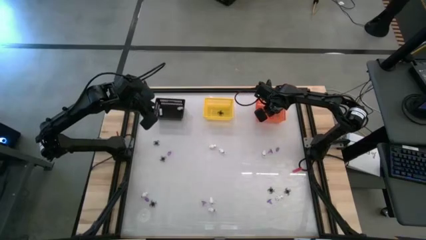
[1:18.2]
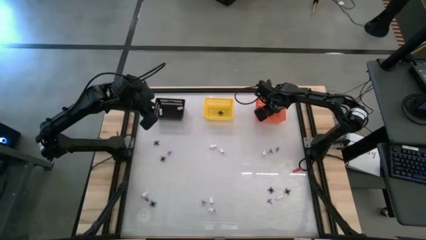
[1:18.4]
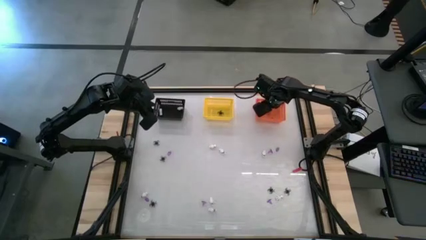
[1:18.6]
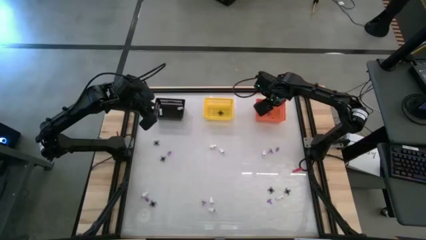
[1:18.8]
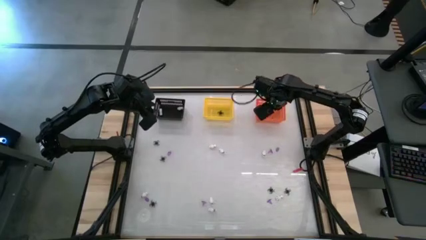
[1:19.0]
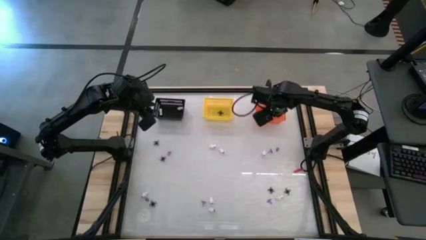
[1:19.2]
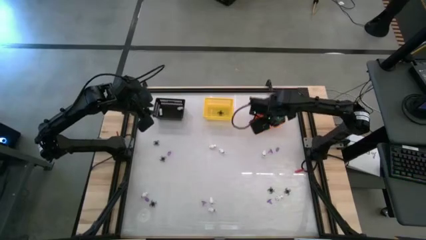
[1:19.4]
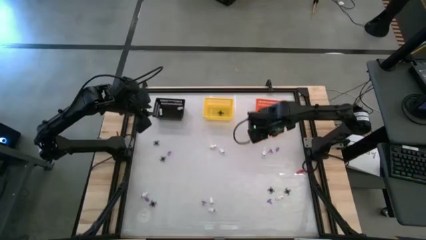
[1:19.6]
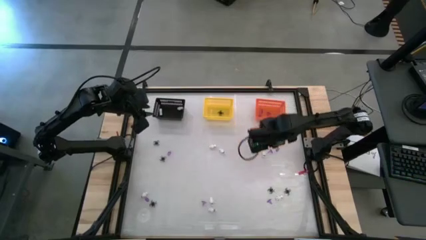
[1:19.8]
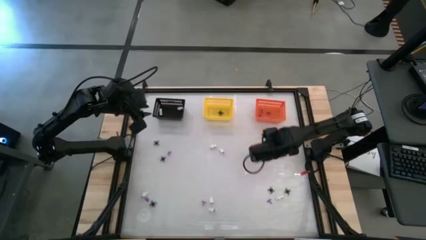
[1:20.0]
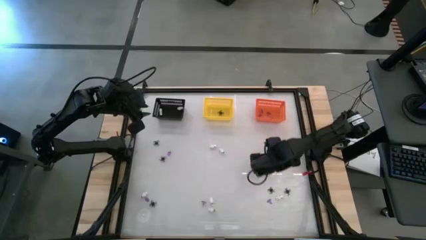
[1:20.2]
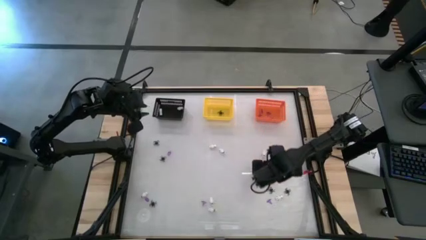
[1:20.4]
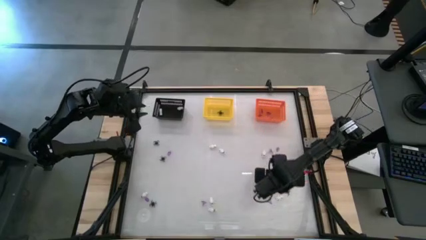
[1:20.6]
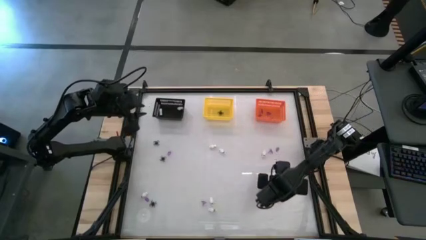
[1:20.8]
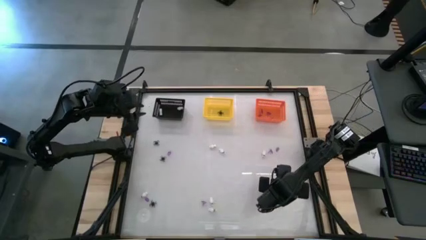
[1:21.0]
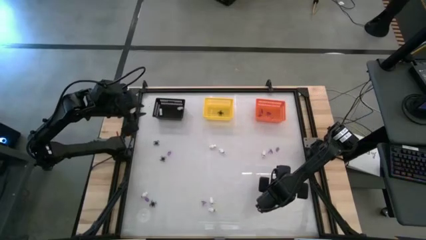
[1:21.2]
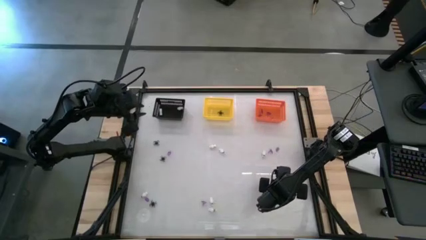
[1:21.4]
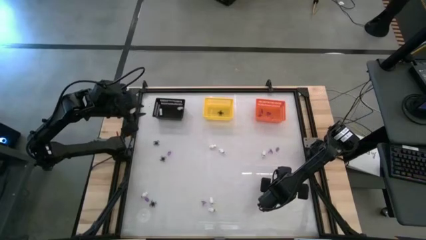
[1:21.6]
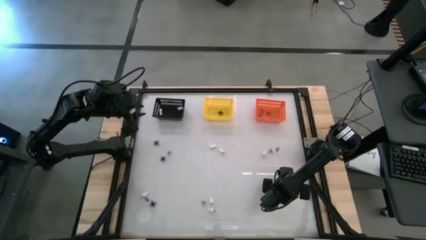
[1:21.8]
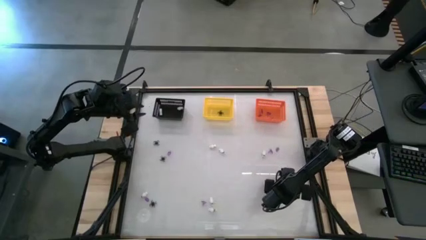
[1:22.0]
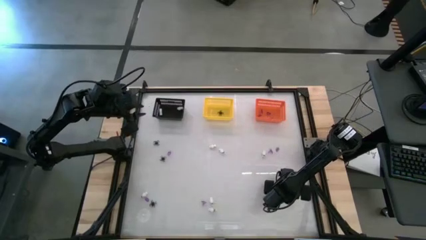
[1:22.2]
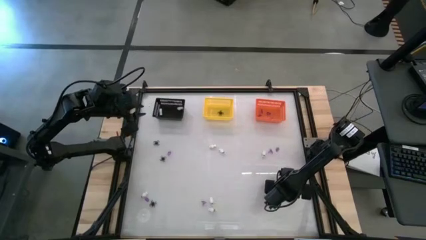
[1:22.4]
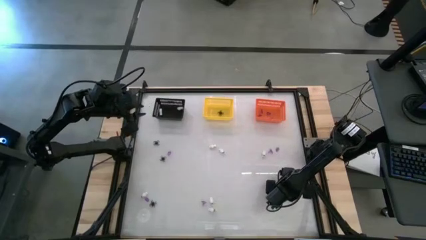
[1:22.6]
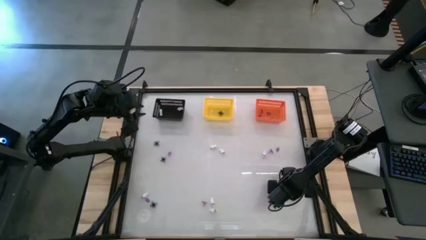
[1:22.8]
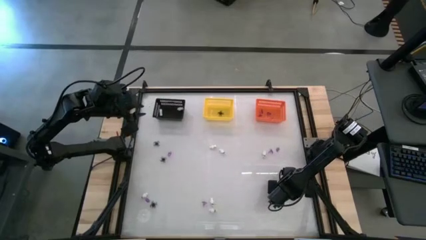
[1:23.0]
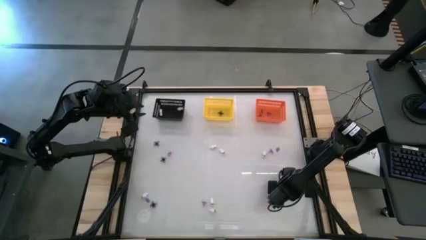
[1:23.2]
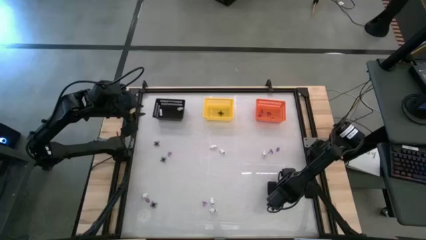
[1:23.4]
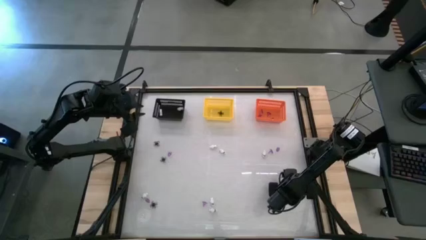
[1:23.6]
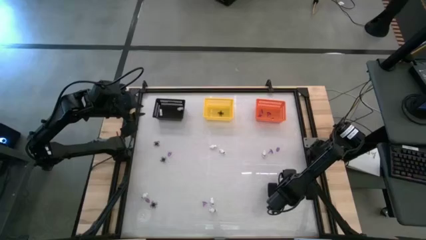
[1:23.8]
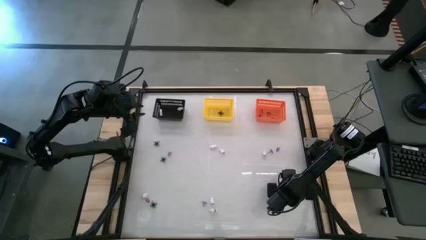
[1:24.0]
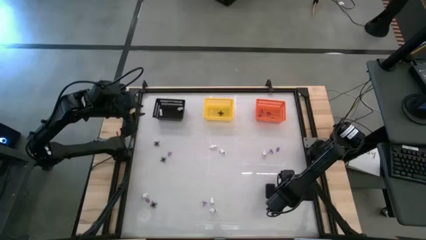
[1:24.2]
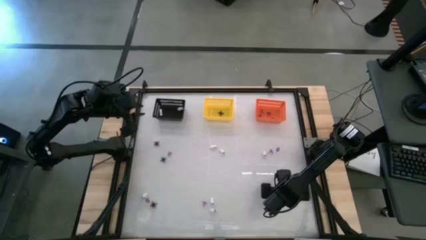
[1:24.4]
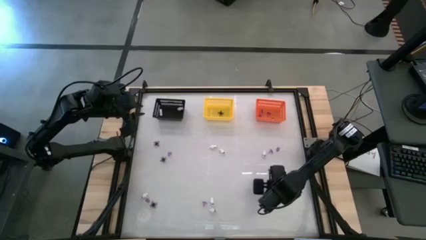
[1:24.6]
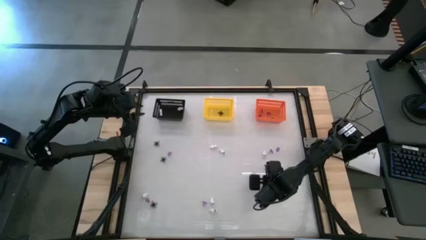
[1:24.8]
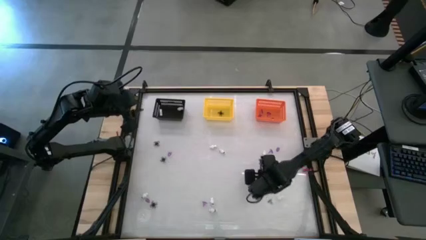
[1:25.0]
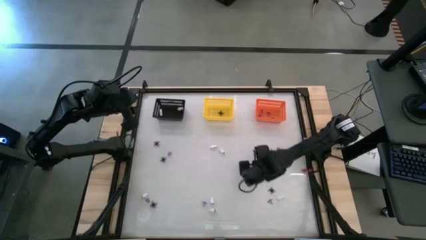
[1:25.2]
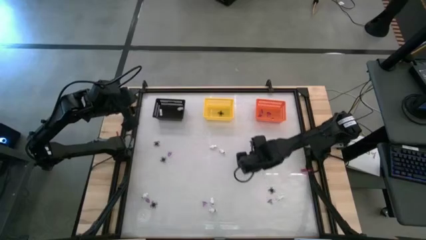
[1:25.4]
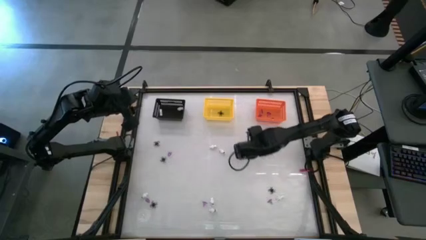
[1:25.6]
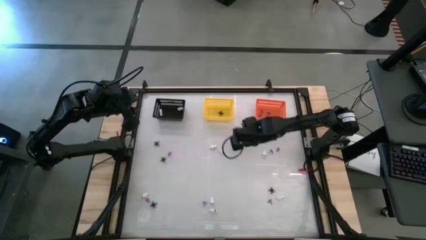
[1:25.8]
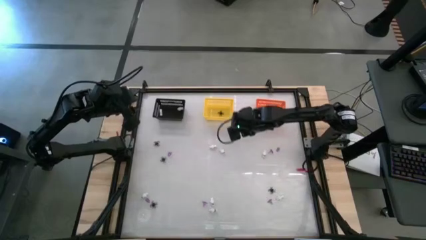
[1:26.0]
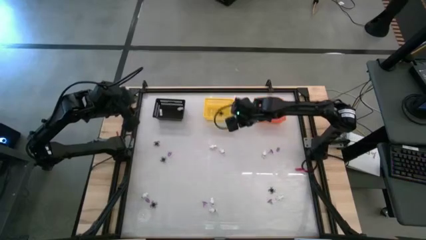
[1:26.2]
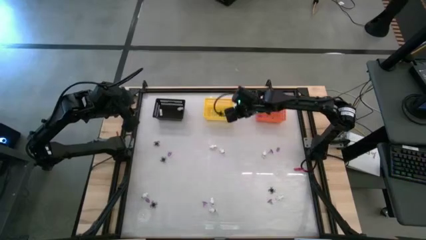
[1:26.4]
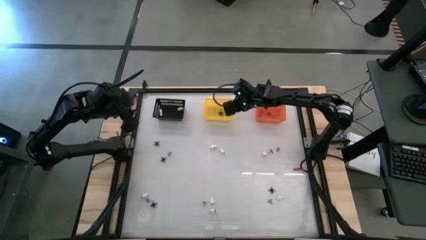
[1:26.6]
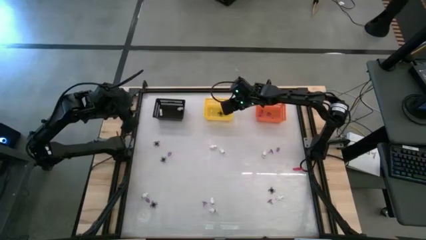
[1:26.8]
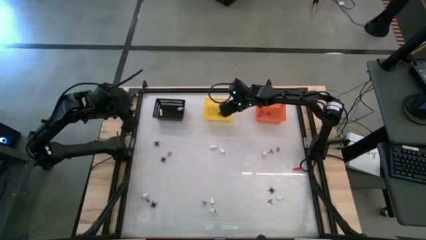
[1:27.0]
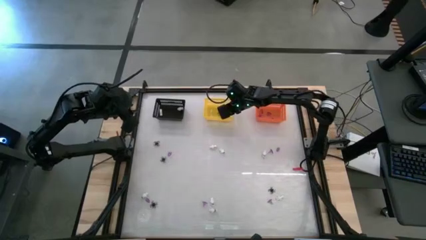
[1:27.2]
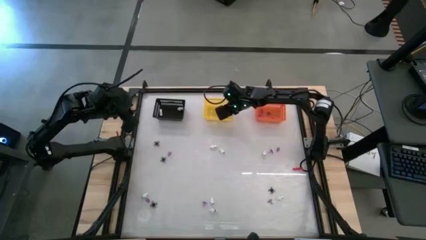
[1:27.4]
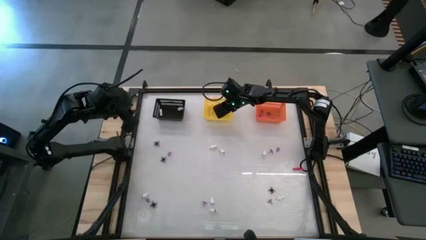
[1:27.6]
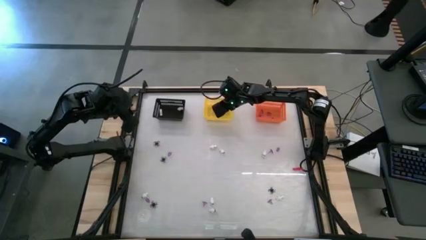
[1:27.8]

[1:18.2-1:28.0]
Task: Sort Halloween decoration
Put the black spider toy into the orange basket
